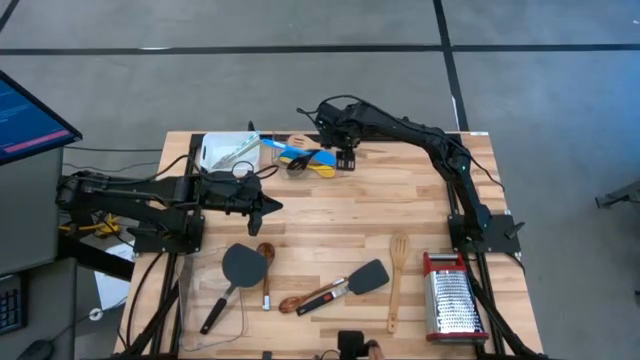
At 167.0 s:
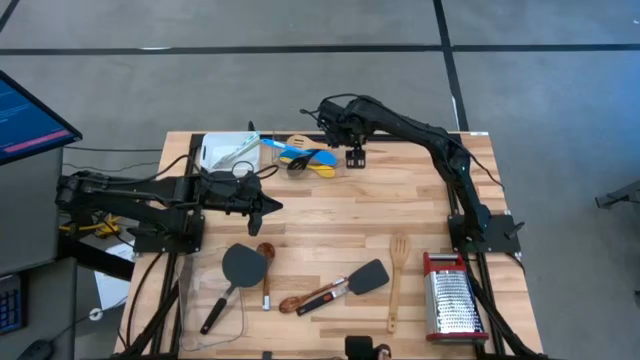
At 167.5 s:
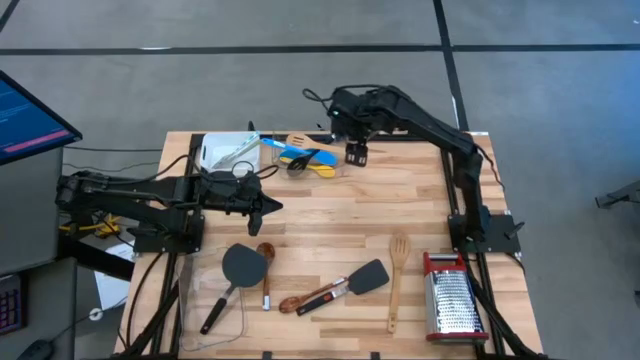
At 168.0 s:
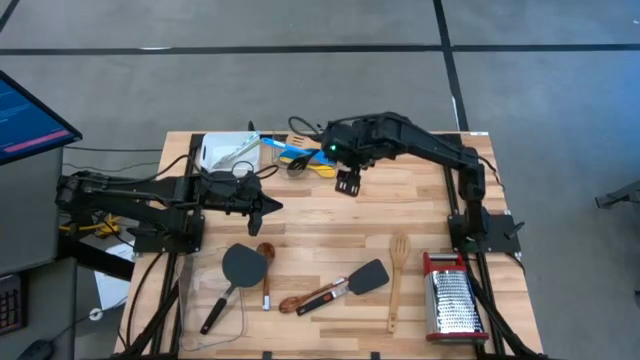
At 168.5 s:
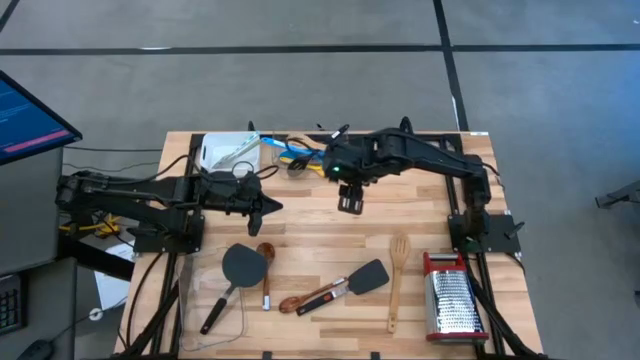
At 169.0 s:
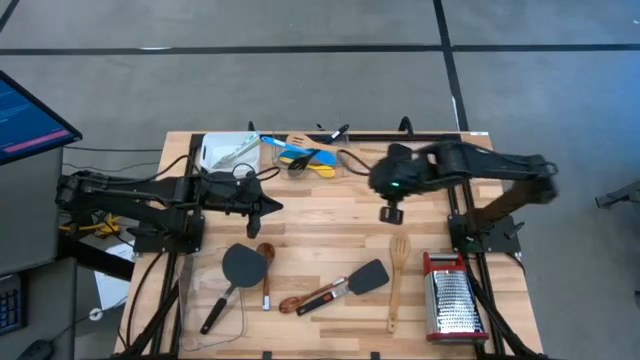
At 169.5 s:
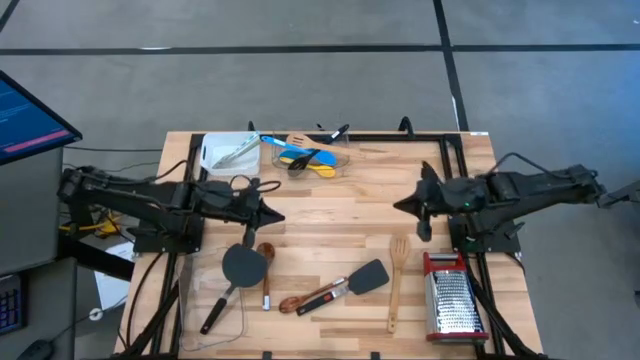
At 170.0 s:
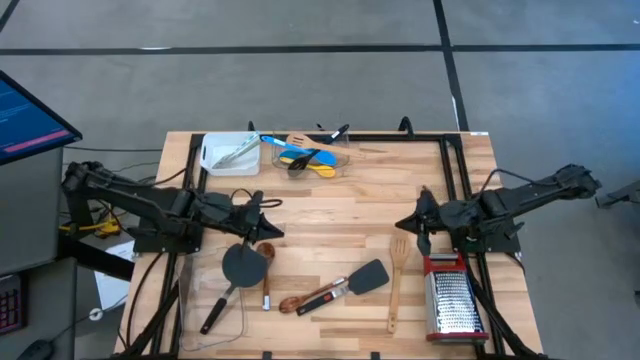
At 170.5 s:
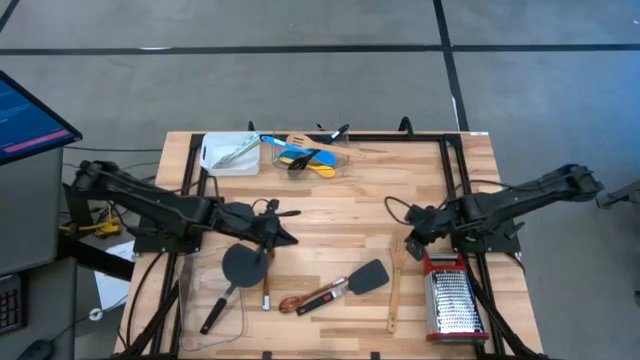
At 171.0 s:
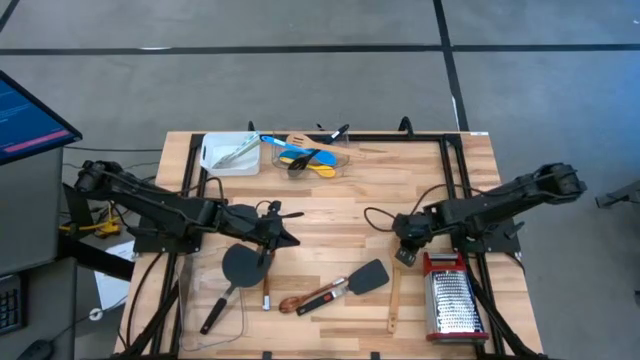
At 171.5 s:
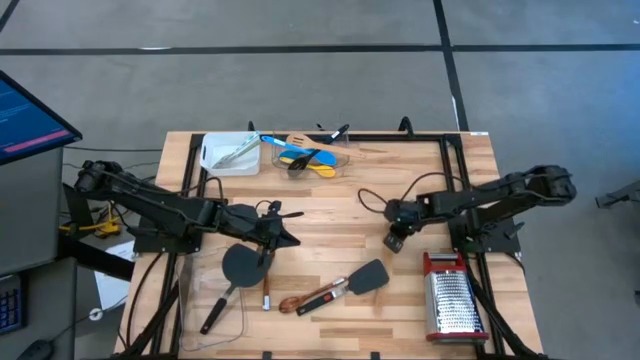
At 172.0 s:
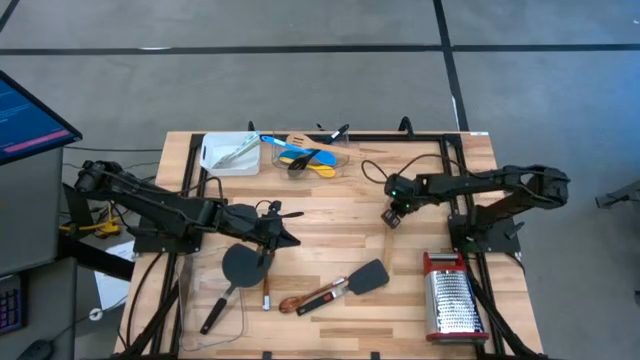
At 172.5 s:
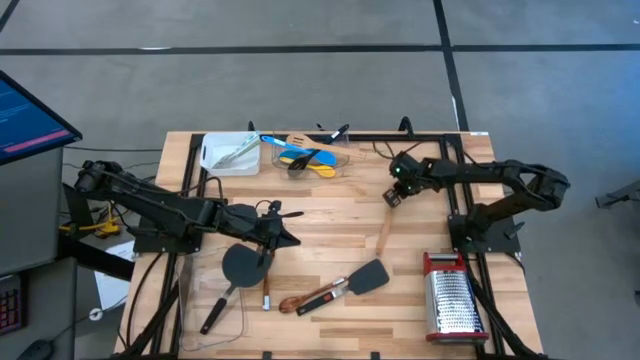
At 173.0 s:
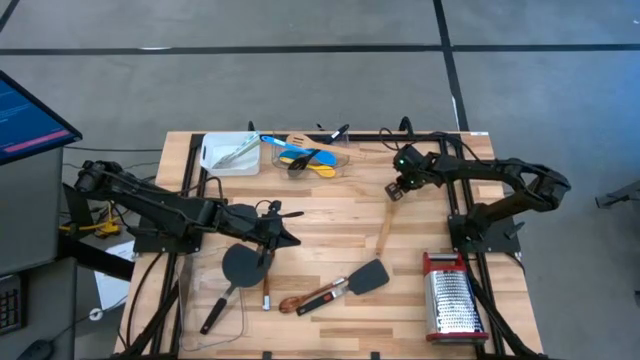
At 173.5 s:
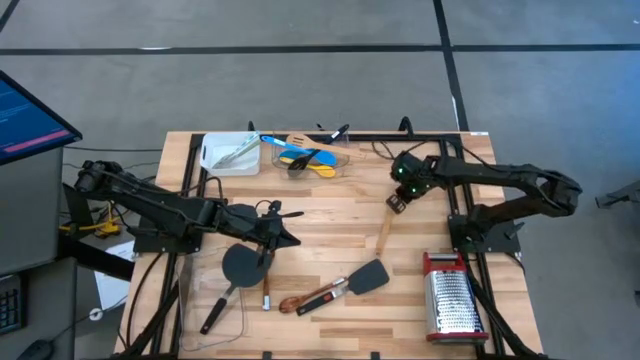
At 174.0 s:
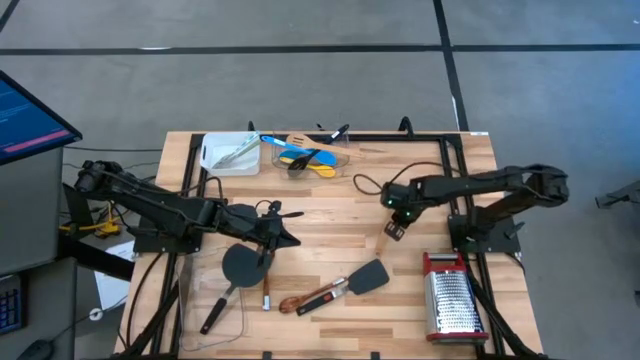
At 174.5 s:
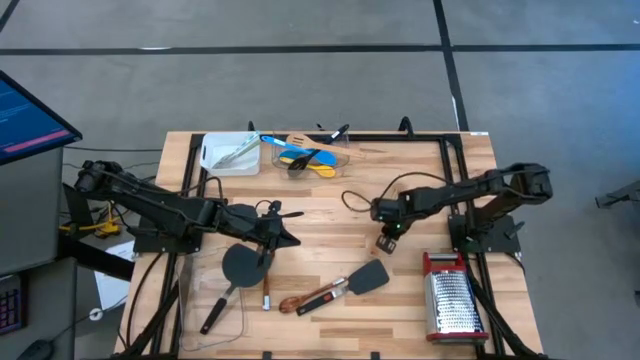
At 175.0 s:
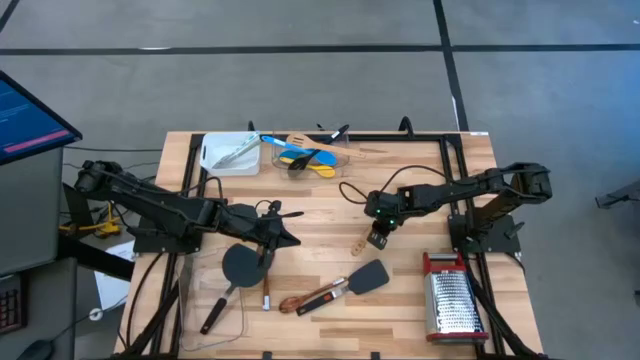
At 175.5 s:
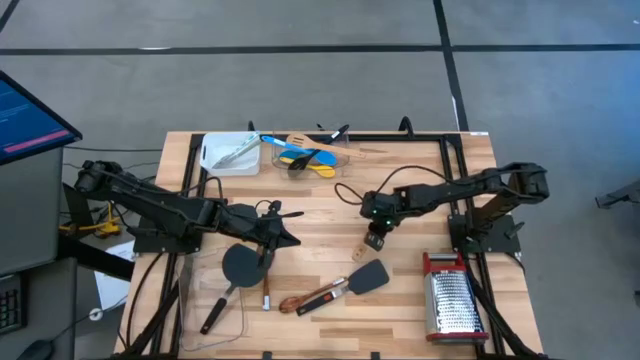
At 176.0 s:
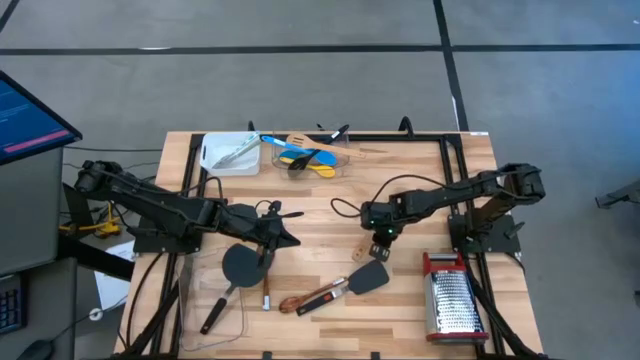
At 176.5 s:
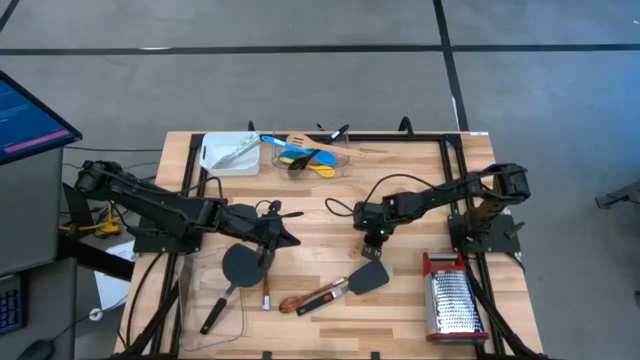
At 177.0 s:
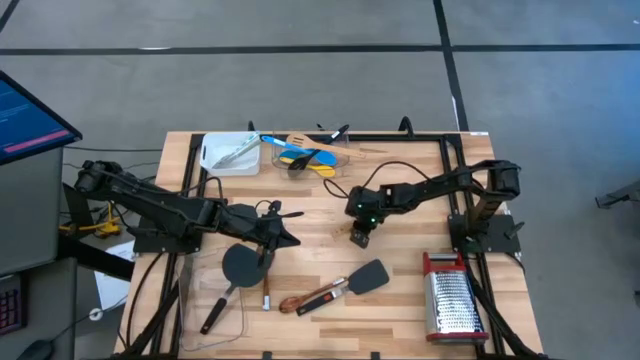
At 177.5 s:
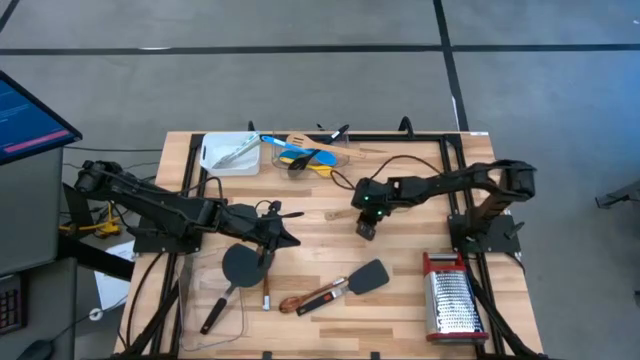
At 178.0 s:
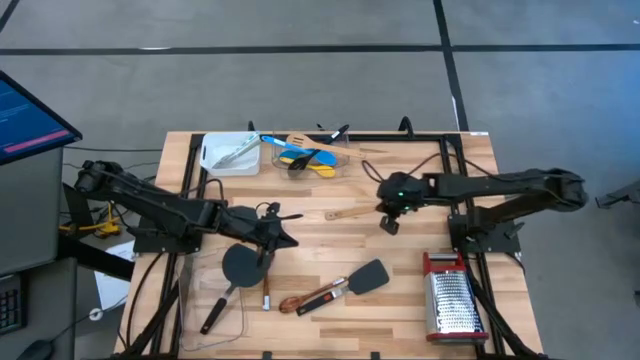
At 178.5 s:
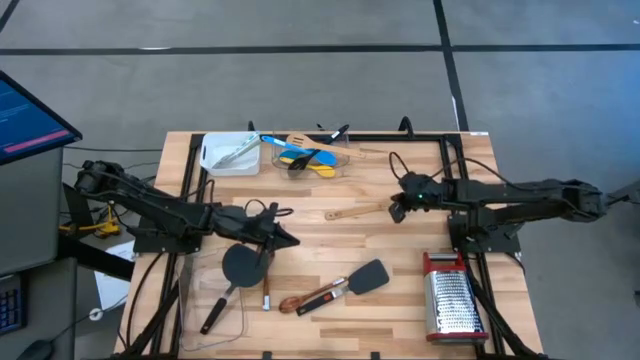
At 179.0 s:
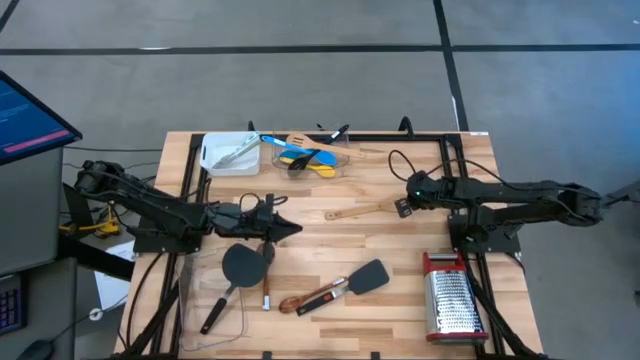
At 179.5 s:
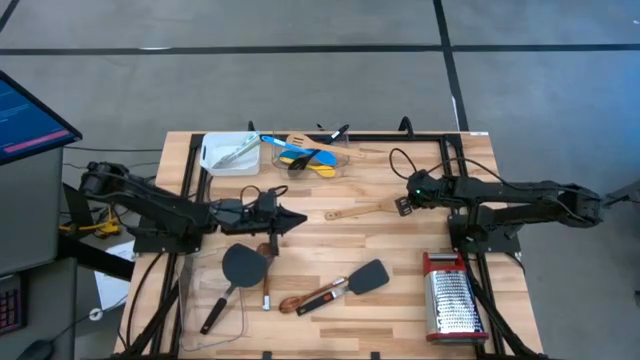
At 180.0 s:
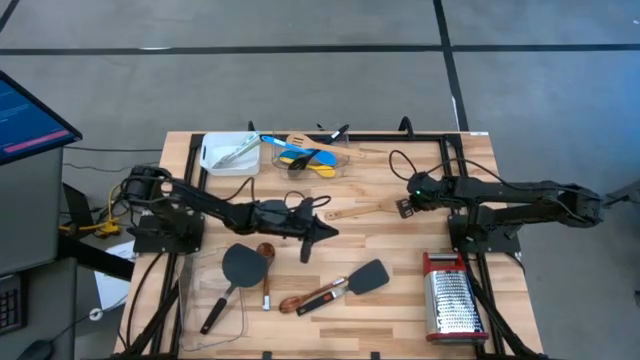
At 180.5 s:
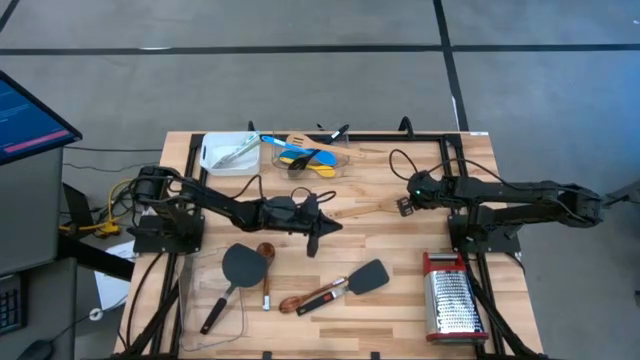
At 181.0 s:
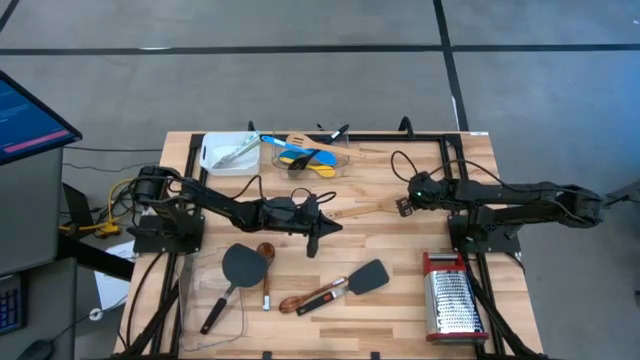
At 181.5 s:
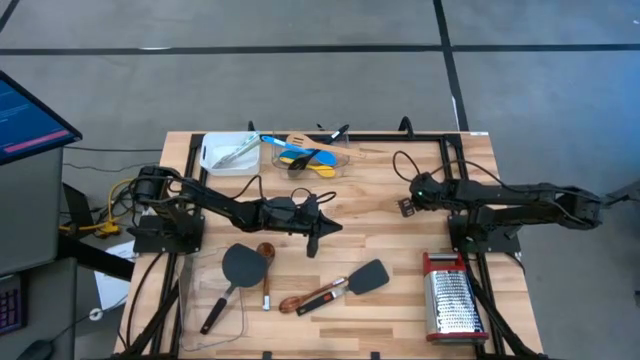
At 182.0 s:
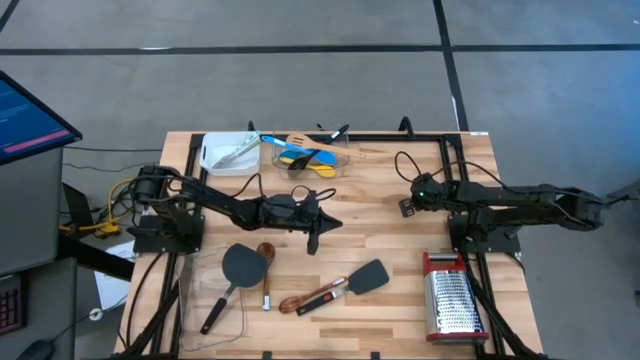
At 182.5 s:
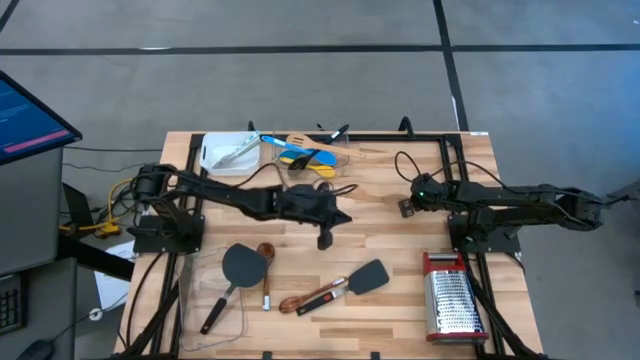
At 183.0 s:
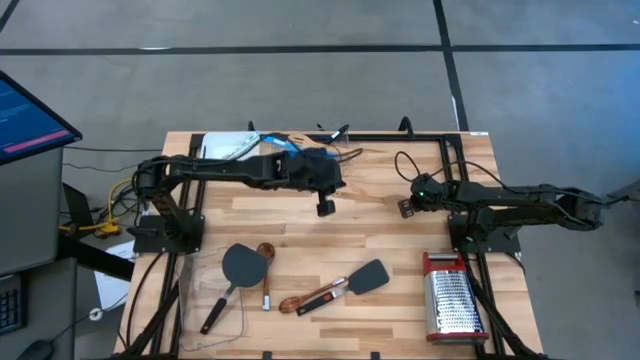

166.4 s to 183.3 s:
Task: Pick & Place Kitchen Items
Put the brown slotted spoon into the top transparent bin

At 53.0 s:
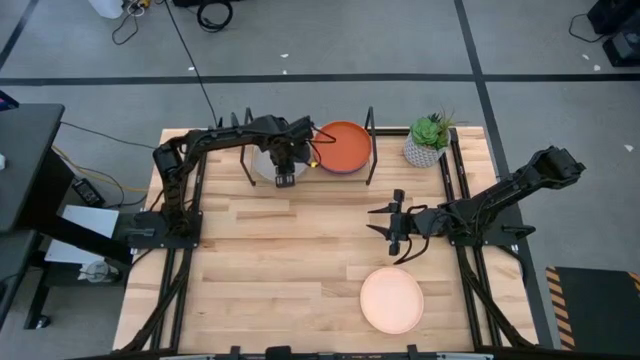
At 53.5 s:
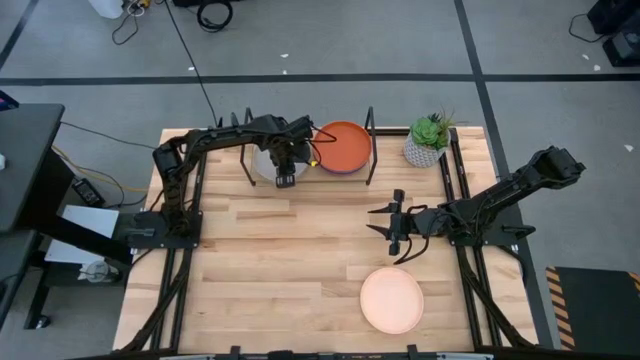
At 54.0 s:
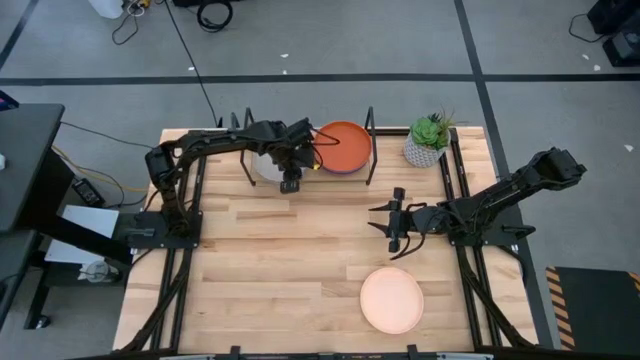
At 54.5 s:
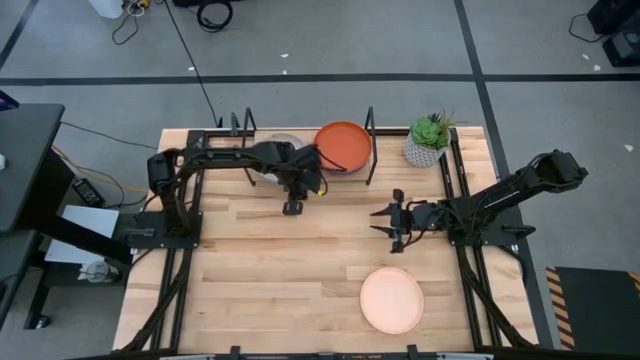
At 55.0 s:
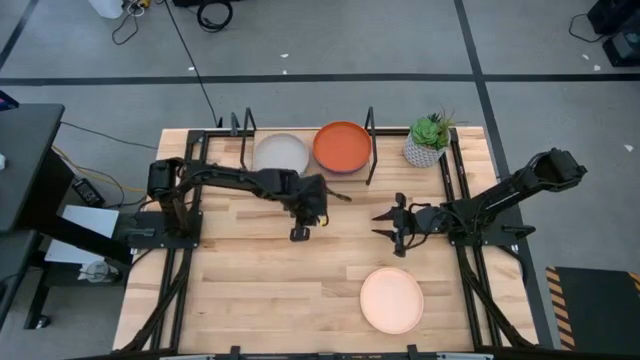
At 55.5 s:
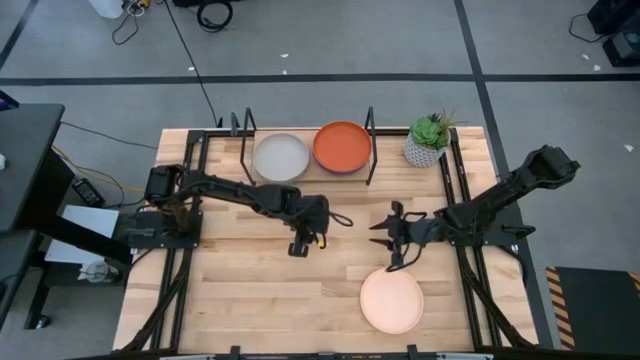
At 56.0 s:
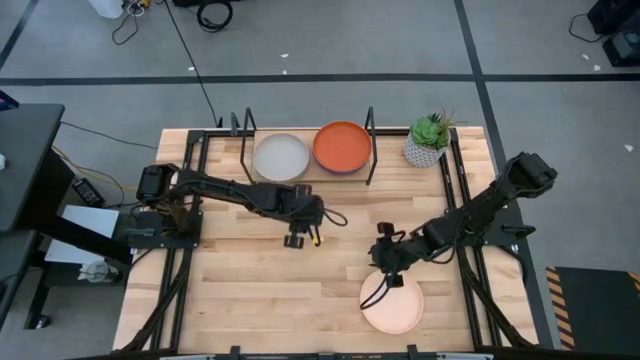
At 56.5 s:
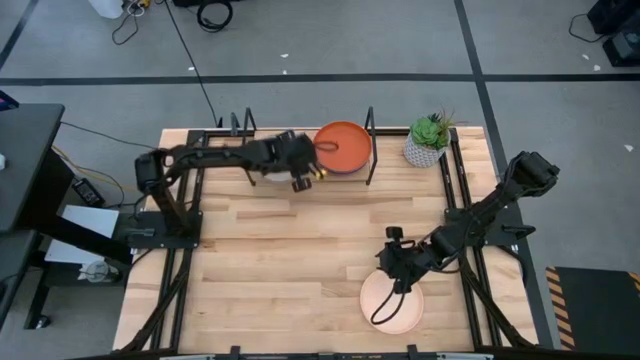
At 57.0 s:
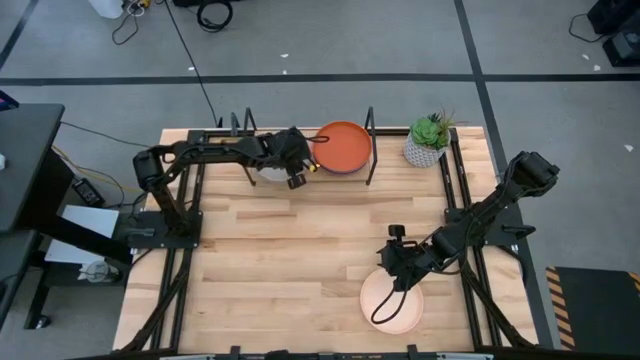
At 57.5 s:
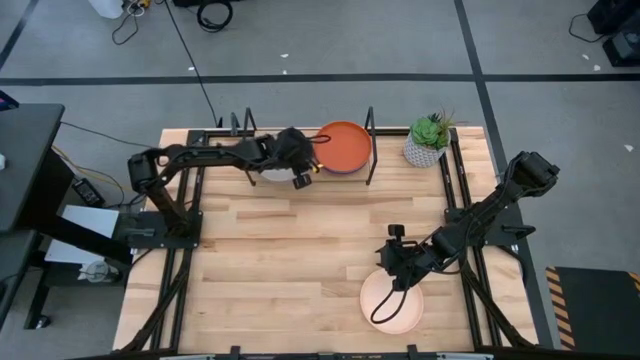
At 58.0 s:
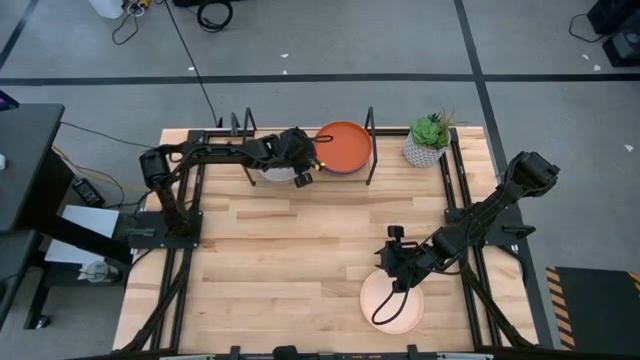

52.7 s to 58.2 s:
Task: Place and stack plates onto a shelf
Adjust the left stacked plates on the shelf
